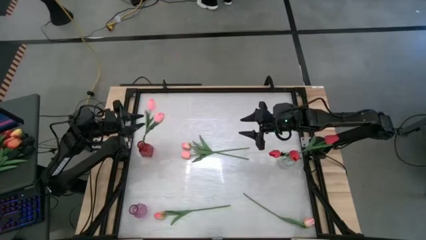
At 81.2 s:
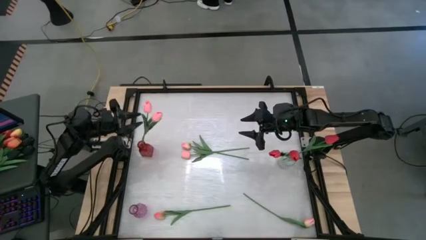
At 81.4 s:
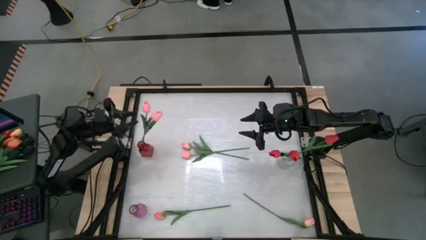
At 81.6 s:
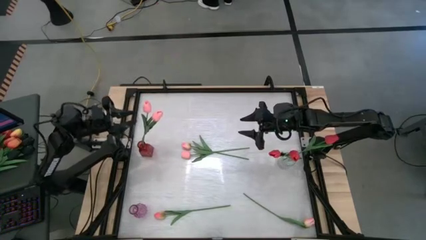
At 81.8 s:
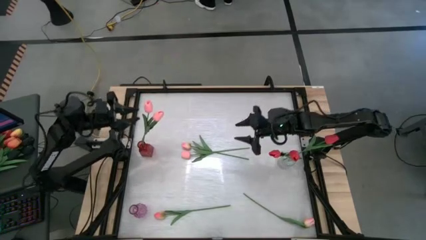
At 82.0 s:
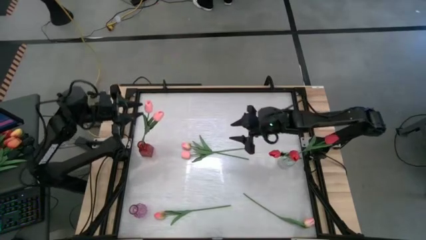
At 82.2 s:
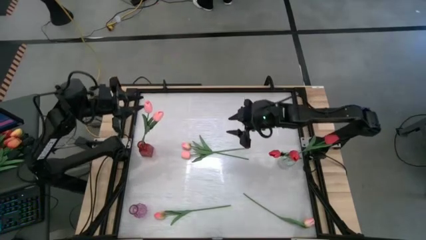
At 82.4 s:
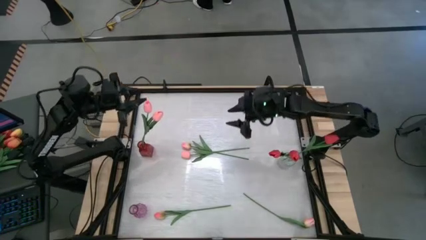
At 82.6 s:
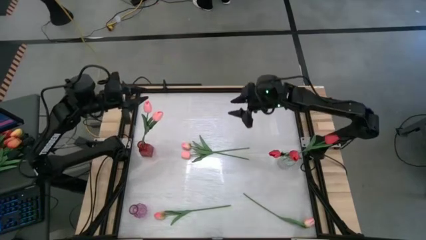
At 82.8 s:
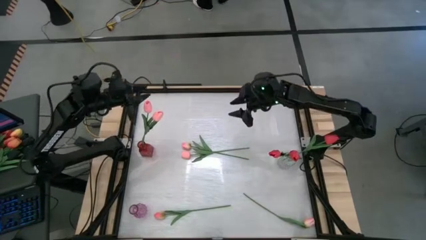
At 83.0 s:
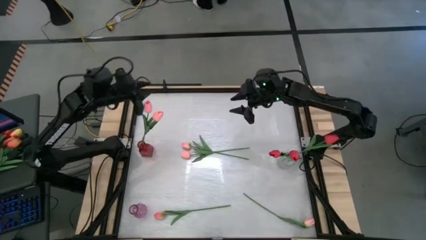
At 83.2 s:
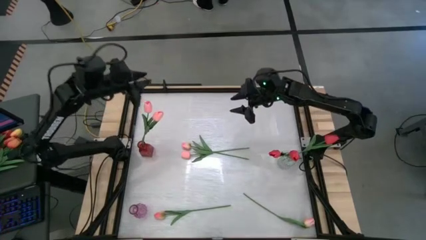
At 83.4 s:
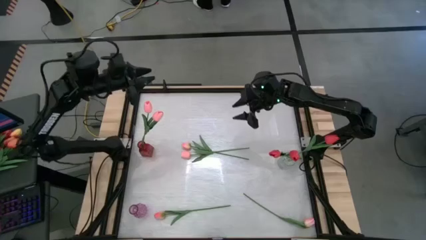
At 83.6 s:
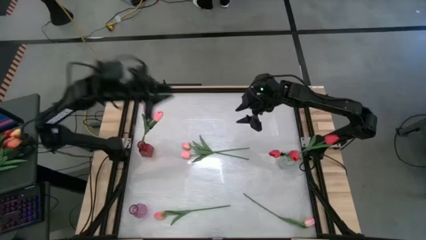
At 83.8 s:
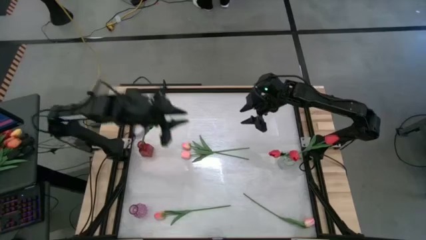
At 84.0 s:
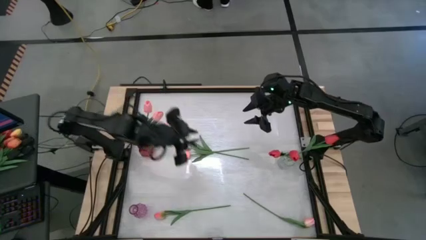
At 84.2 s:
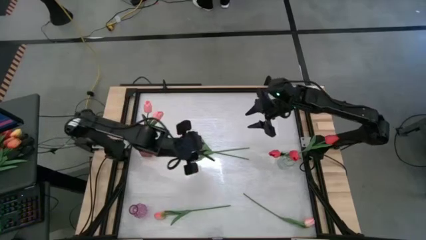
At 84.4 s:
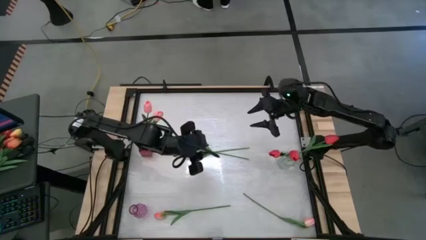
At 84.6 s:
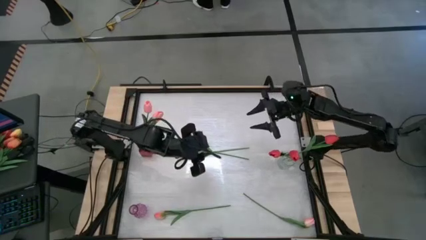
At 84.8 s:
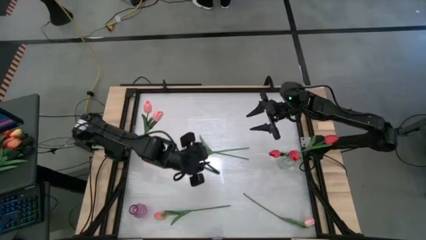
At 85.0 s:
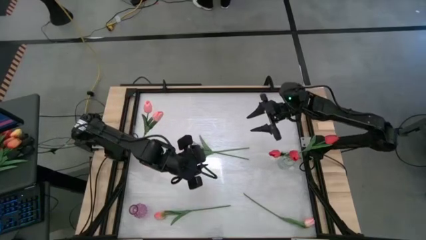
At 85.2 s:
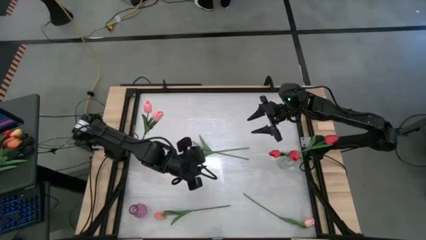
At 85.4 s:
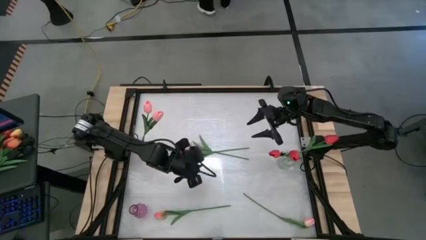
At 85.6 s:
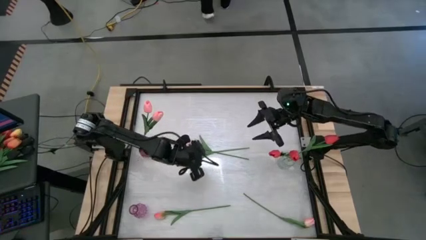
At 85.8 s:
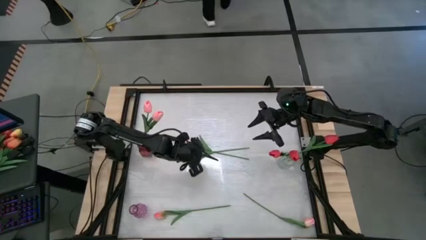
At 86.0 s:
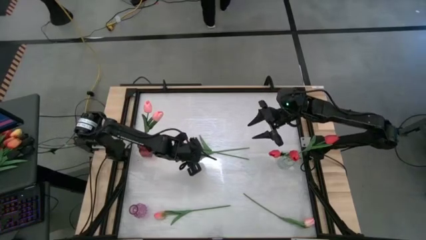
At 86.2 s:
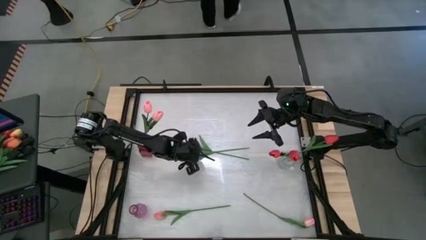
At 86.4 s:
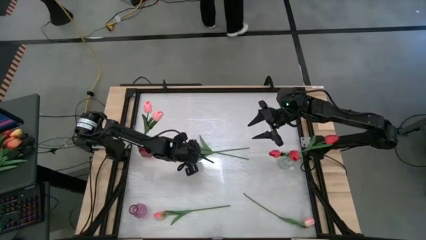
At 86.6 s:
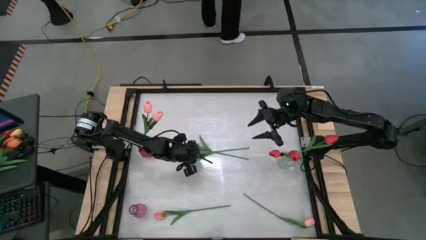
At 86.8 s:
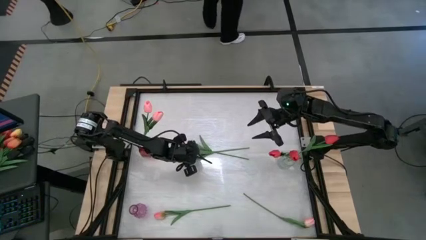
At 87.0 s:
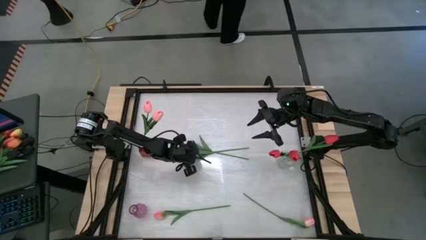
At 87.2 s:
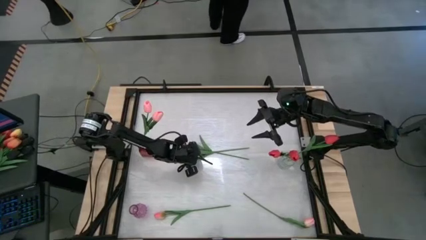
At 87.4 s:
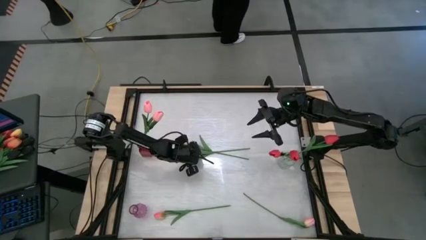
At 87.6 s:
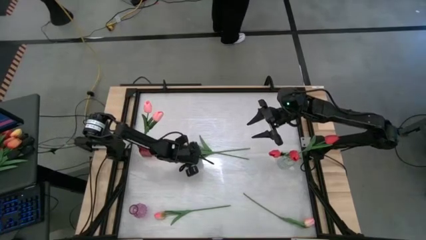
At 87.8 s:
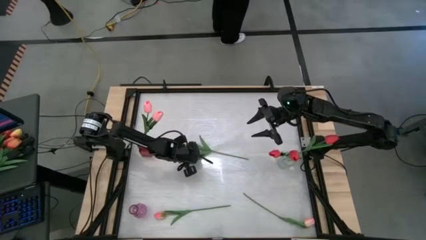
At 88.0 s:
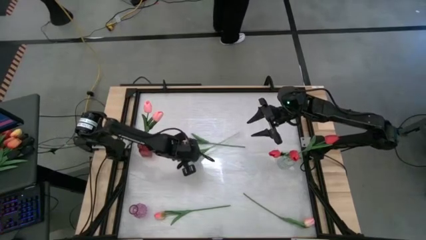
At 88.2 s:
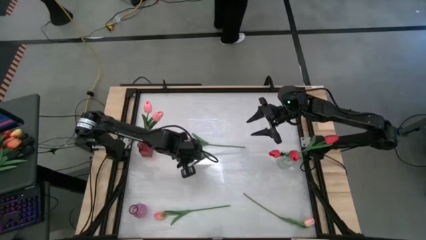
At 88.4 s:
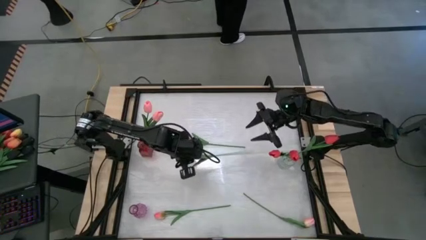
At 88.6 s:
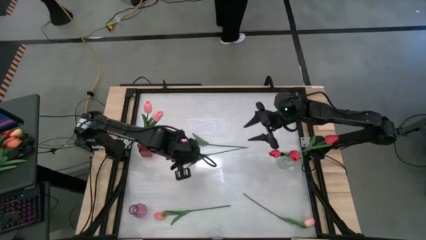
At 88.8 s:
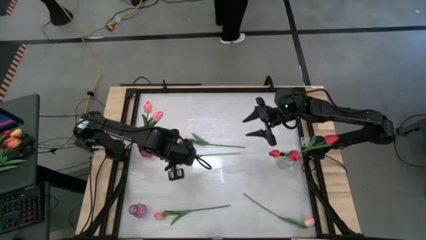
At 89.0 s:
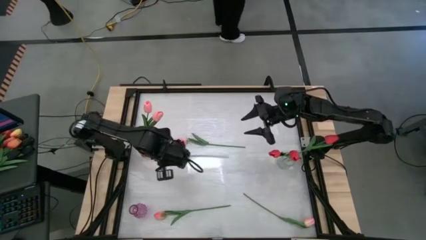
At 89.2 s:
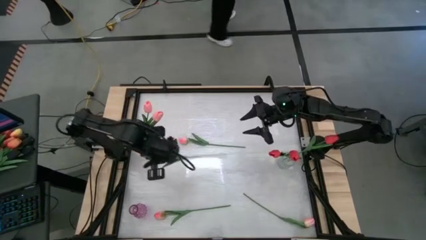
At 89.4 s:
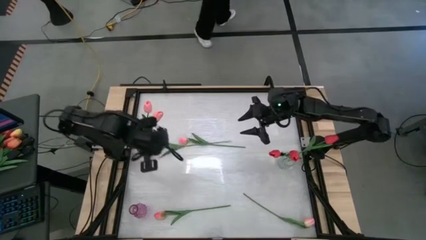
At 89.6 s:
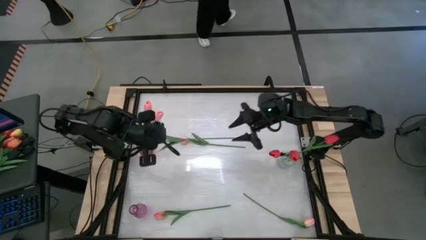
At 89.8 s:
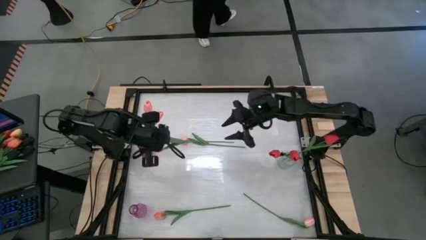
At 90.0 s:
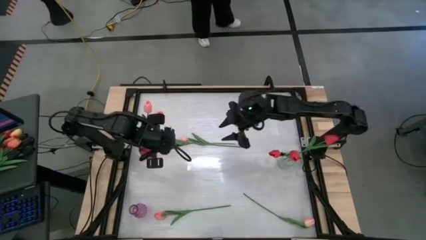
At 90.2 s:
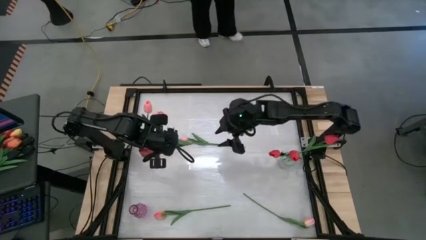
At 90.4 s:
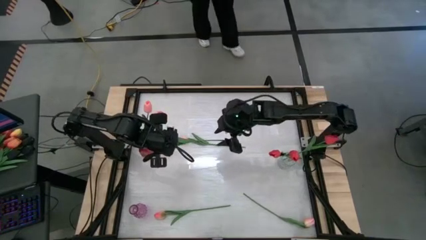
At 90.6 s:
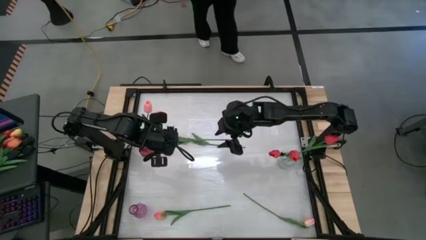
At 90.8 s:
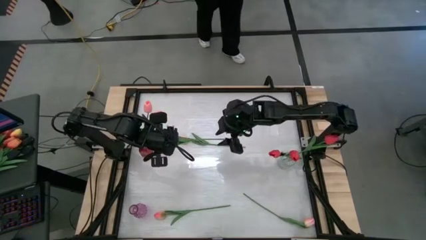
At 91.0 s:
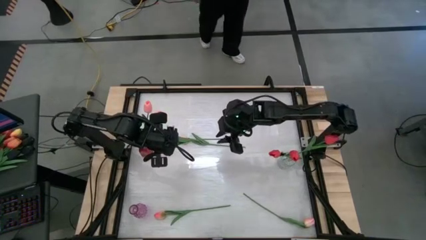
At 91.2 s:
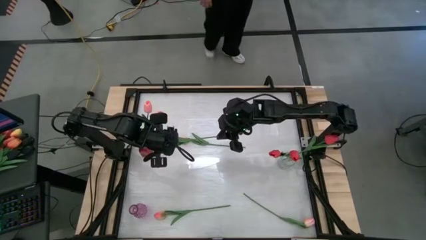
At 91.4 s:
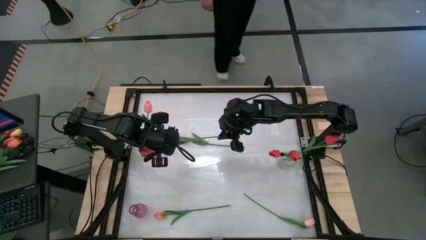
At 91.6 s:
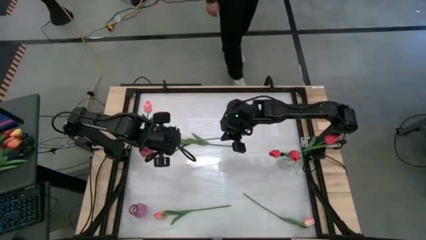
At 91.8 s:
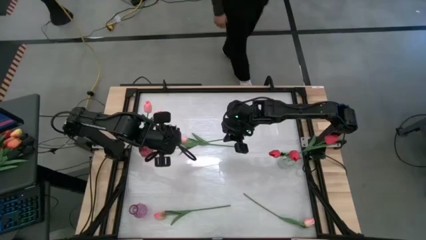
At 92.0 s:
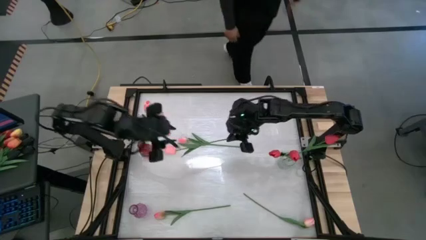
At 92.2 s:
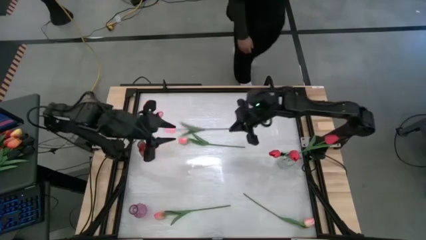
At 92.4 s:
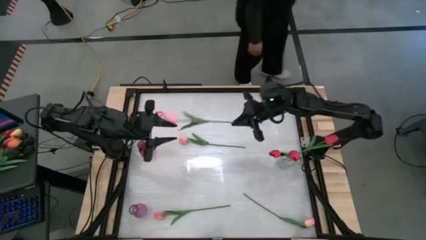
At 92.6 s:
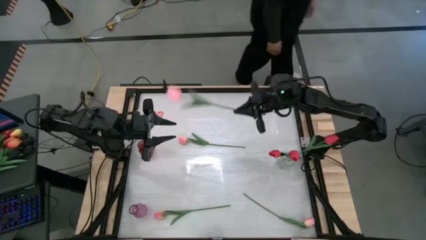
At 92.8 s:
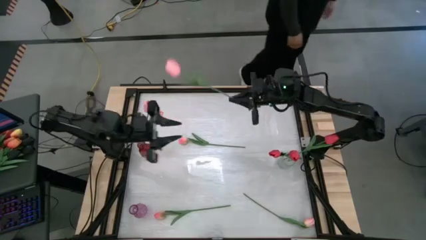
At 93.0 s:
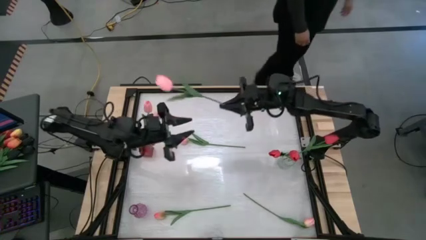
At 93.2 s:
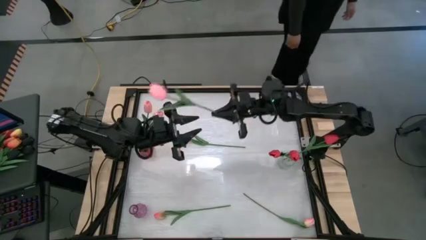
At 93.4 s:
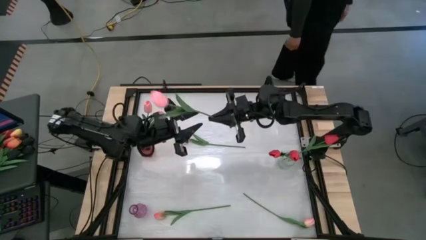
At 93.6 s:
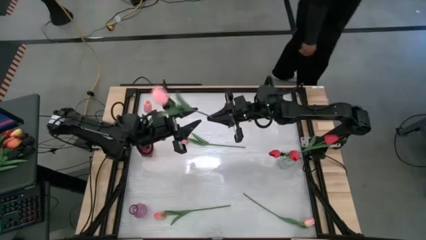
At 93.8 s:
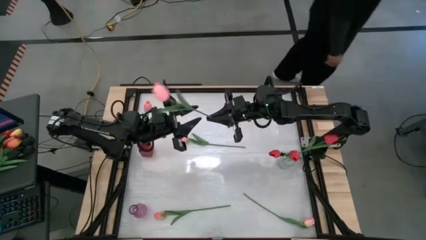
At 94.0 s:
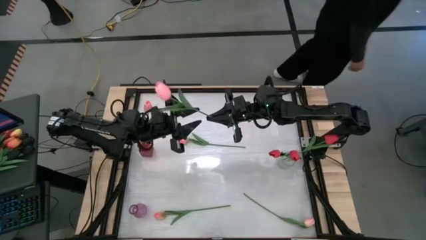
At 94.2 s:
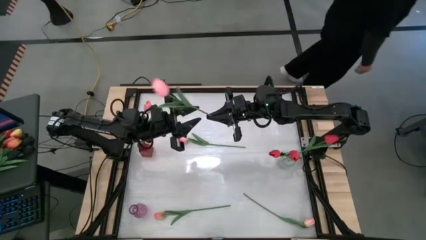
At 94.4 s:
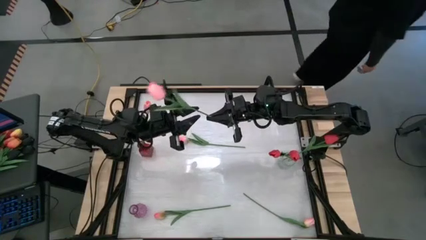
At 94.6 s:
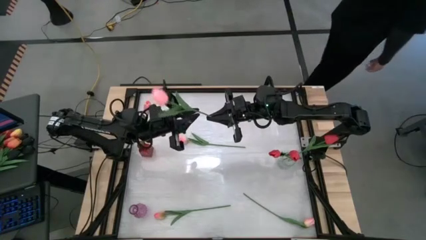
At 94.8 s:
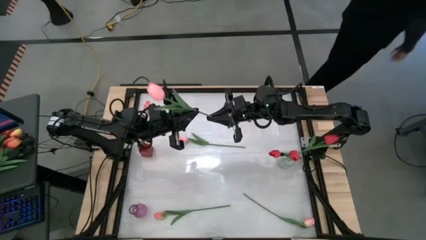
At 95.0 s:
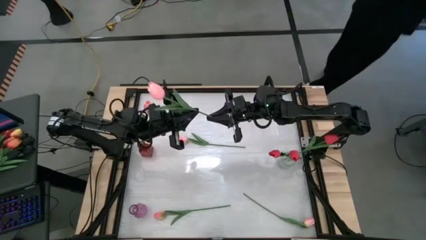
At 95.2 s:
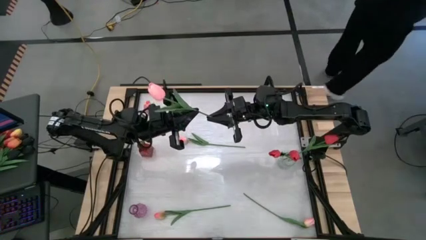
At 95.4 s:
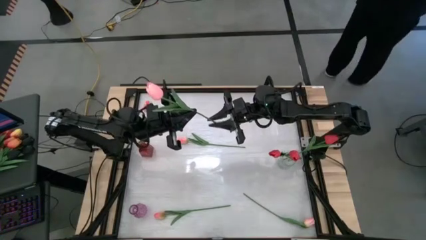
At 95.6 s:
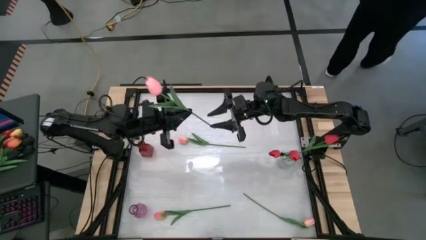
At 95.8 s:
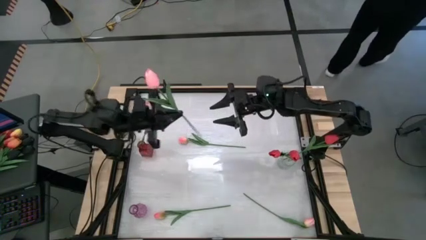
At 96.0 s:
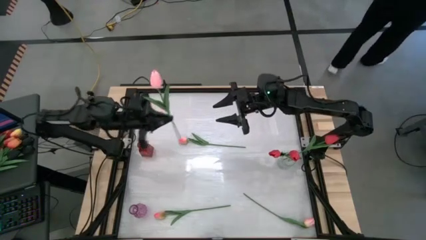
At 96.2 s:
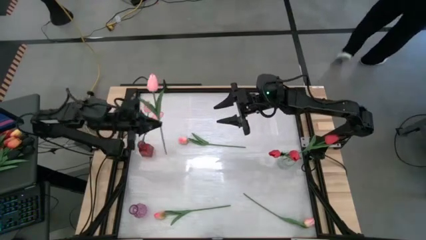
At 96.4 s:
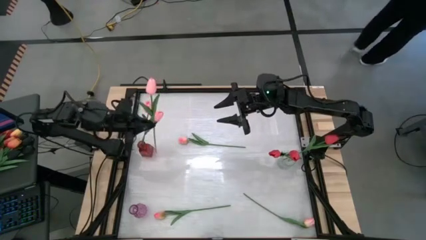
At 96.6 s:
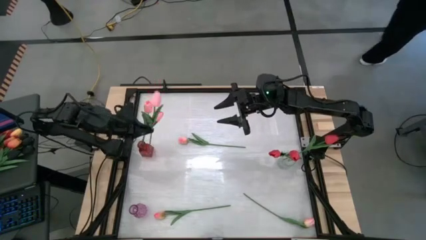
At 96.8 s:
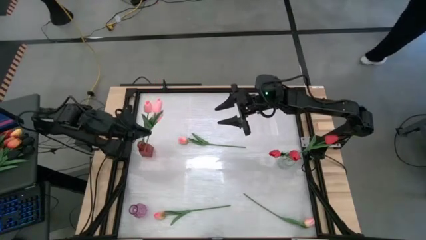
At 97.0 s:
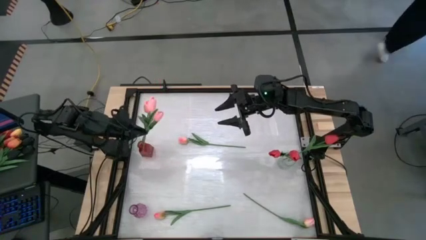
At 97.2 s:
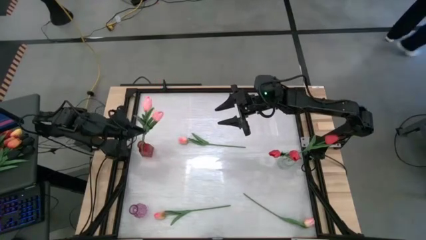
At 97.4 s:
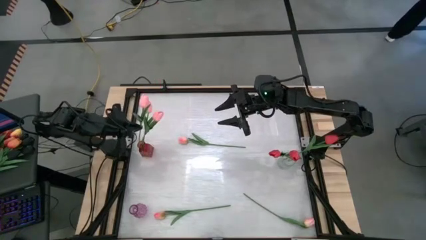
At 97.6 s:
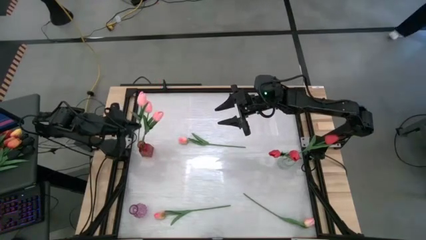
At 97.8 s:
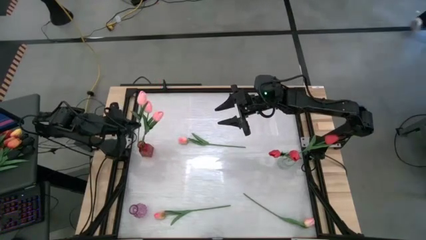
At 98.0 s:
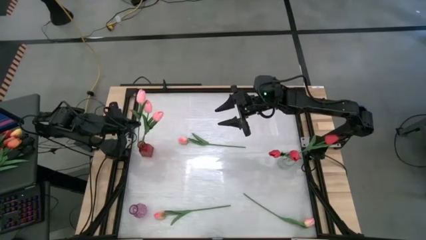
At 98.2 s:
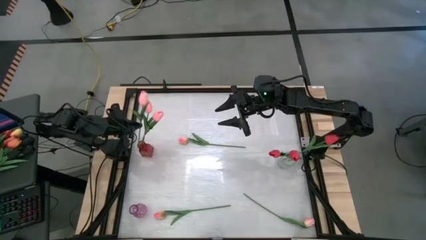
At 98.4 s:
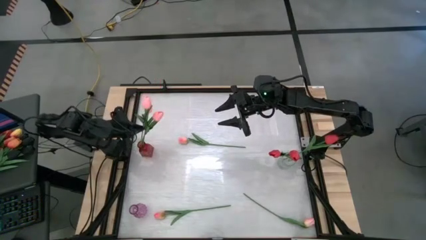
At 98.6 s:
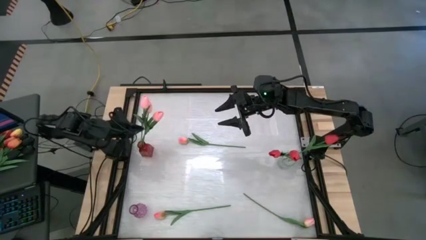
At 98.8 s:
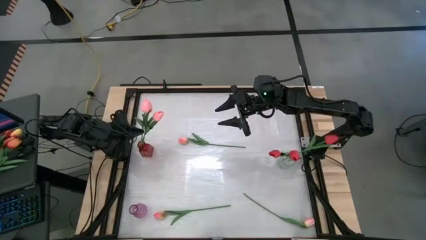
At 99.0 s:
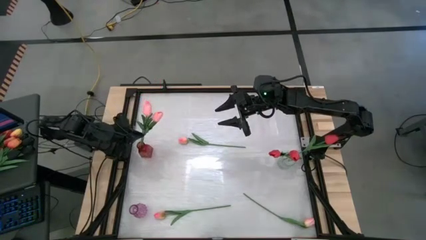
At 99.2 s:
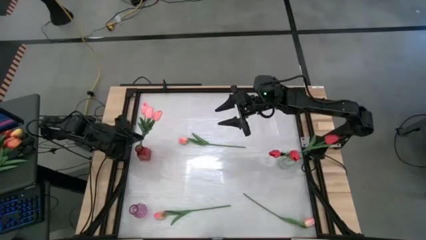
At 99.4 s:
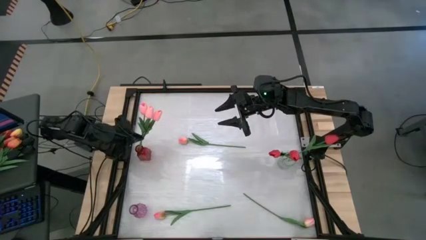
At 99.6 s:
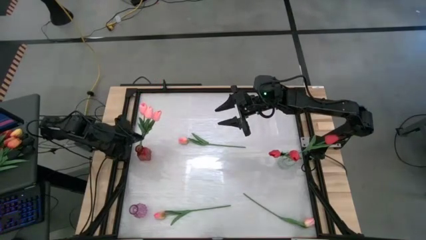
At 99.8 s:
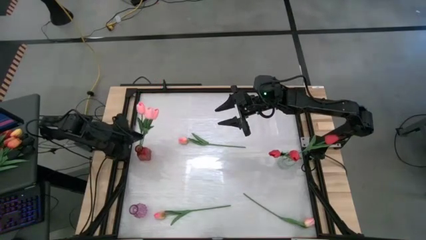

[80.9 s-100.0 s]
Task: Sort flowers into vase by color
Put the pink flower into the red flower vase
